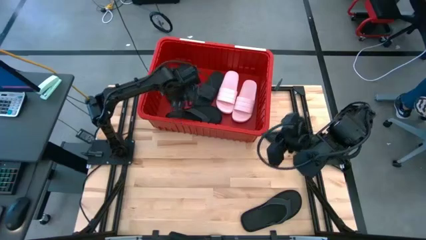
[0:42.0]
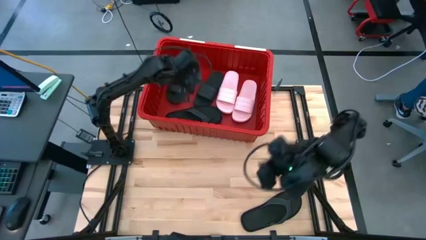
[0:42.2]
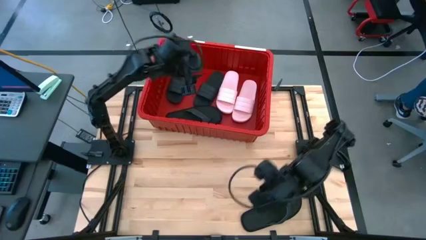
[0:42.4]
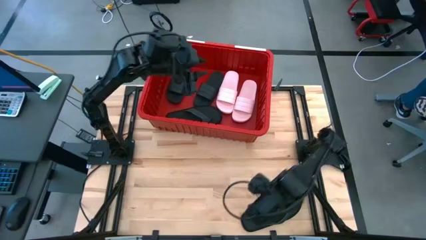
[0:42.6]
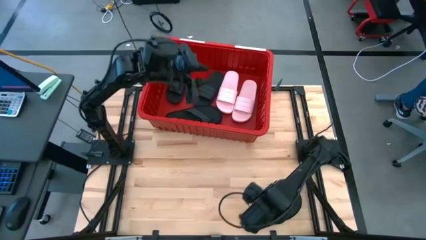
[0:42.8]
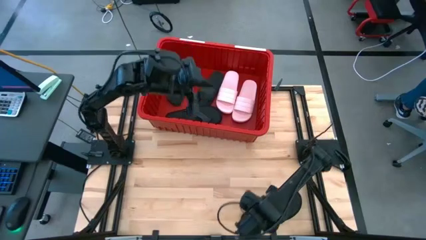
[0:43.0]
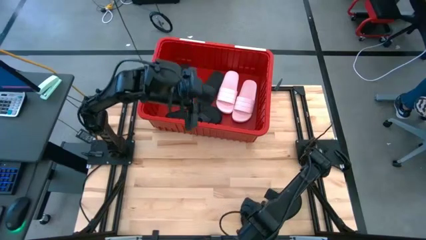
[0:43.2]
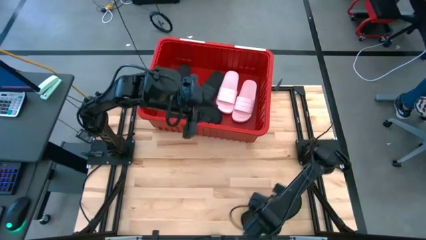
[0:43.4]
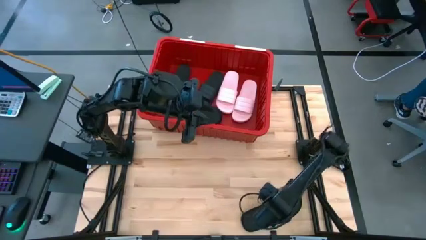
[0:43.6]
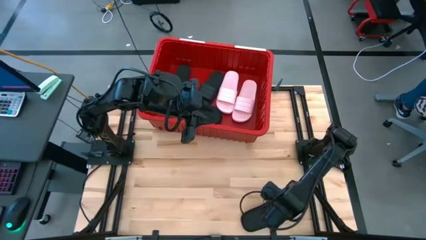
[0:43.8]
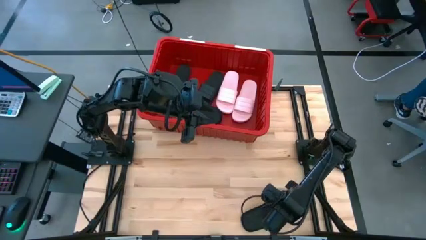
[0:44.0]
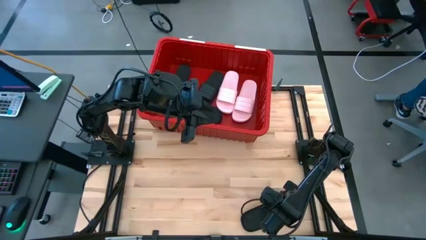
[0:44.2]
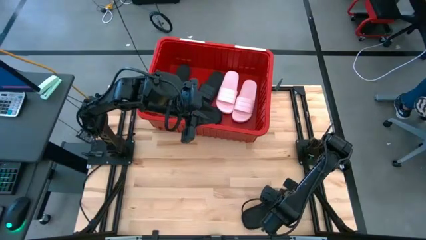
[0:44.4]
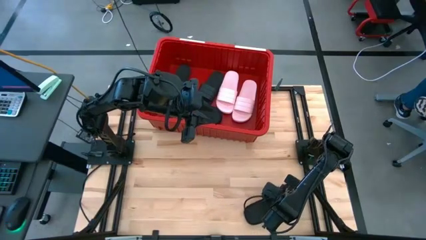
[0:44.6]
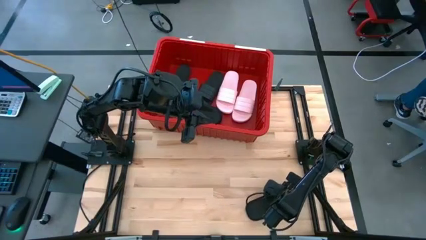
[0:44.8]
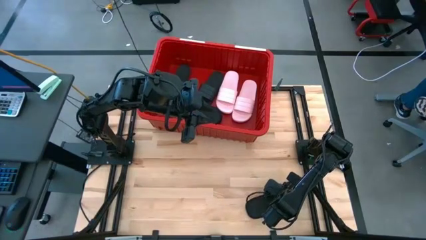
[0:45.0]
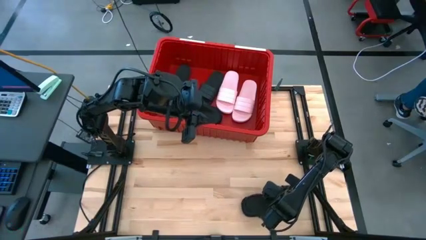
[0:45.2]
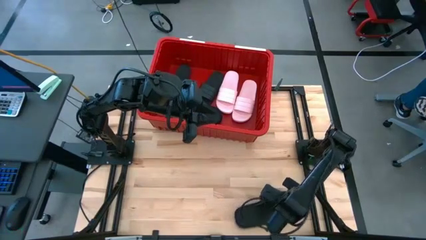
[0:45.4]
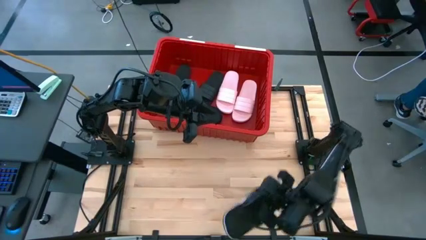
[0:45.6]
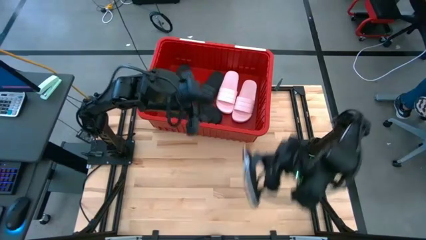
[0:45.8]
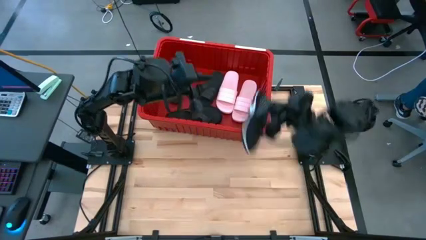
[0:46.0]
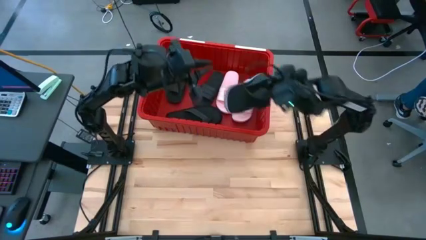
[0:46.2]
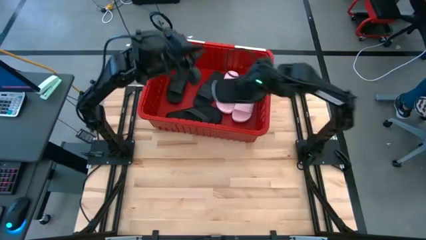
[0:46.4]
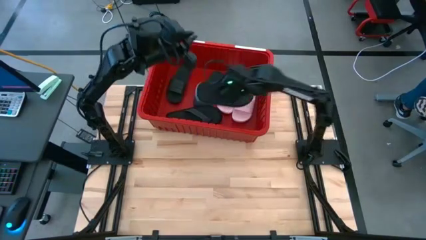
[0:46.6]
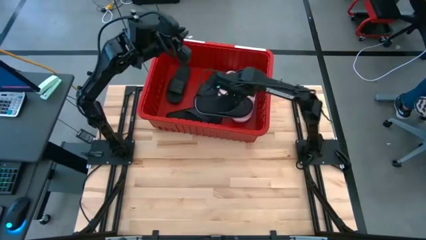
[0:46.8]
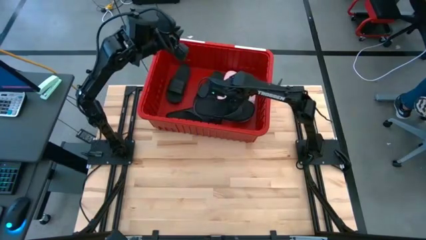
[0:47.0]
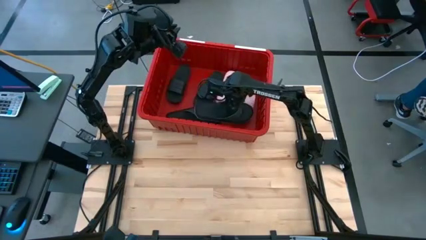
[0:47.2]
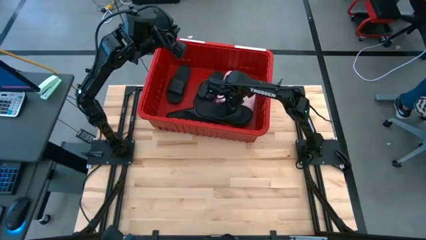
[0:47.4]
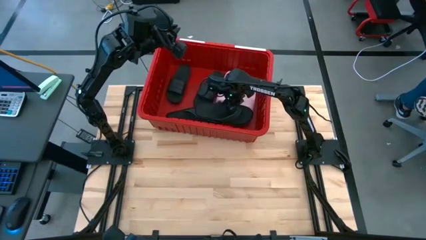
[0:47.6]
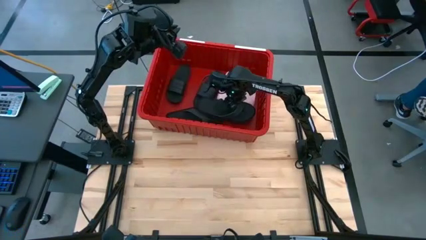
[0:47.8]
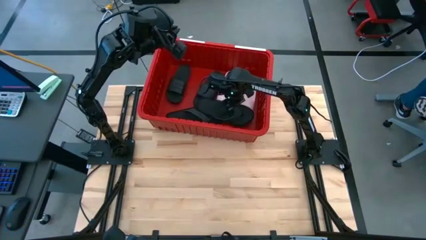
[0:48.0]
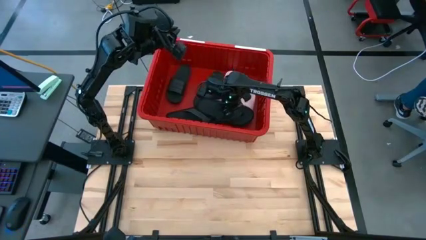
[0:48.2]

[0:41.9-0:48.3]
Task: Pick and place slides into bin
Put the black slipper into the red bin

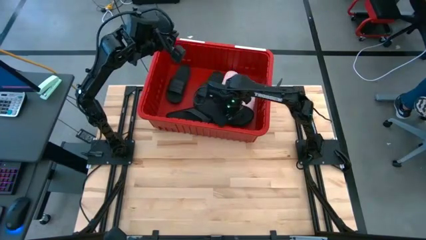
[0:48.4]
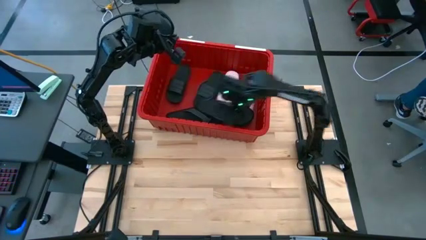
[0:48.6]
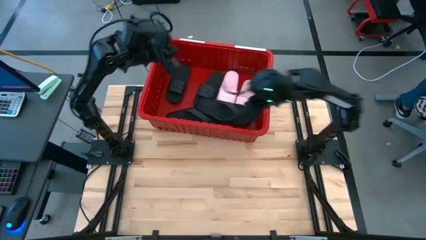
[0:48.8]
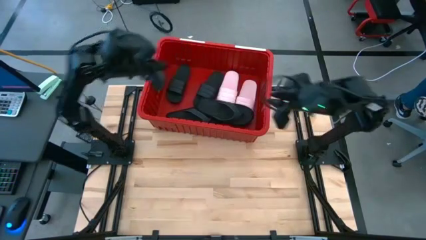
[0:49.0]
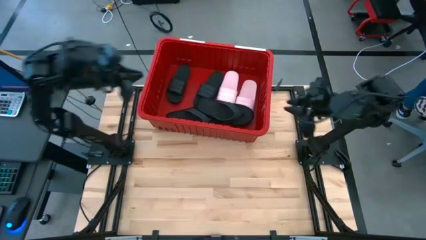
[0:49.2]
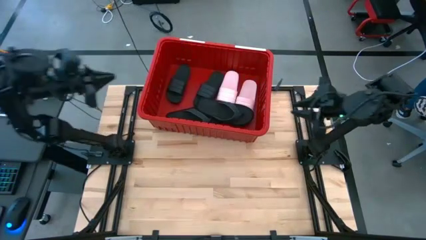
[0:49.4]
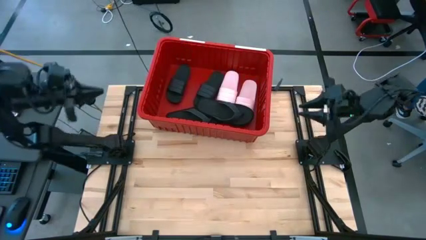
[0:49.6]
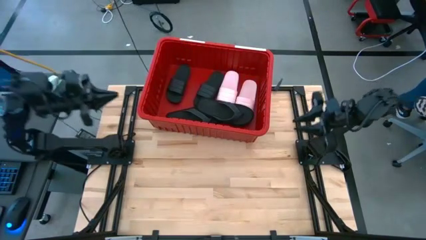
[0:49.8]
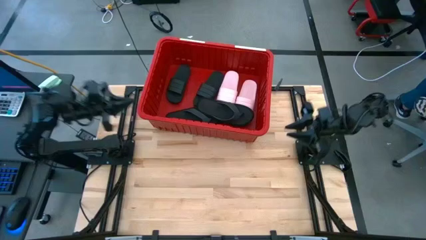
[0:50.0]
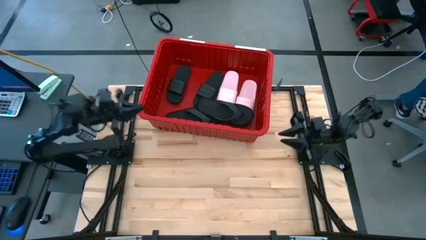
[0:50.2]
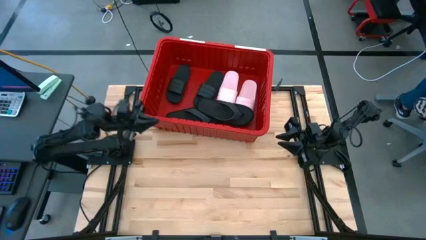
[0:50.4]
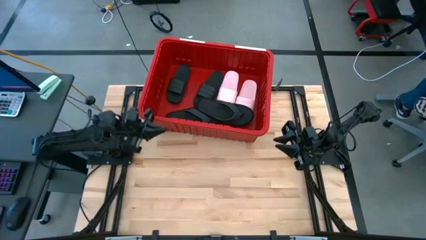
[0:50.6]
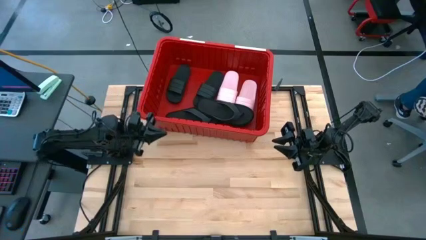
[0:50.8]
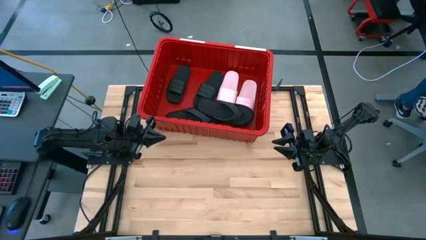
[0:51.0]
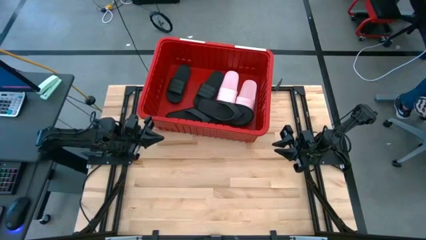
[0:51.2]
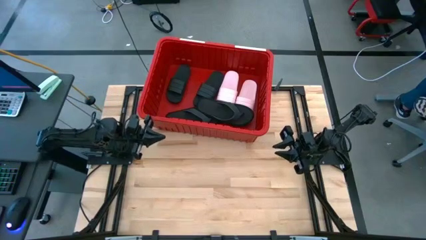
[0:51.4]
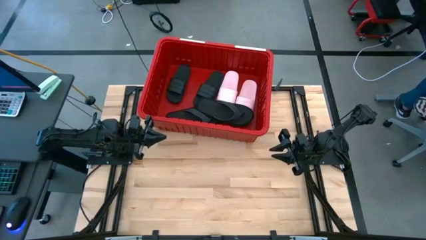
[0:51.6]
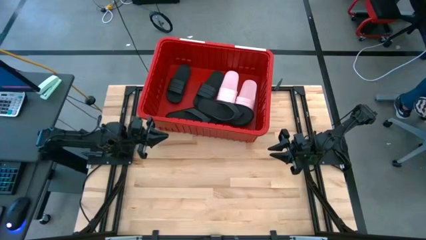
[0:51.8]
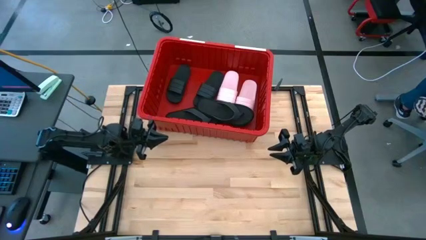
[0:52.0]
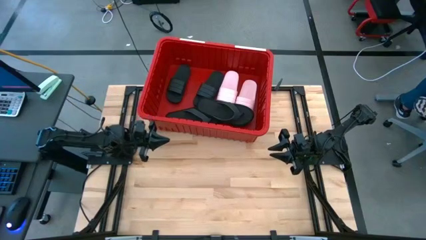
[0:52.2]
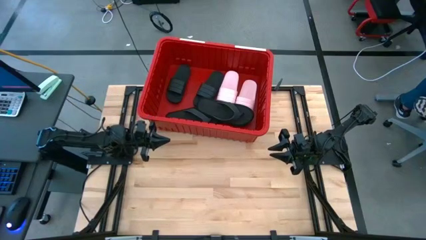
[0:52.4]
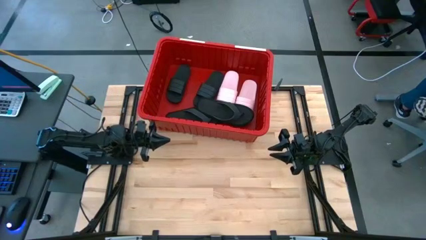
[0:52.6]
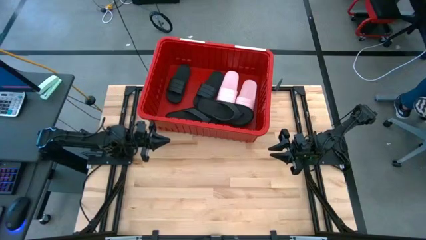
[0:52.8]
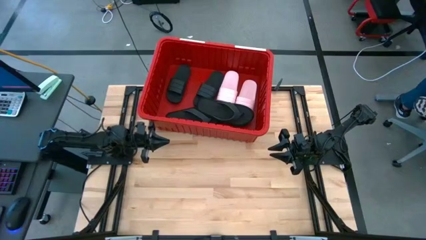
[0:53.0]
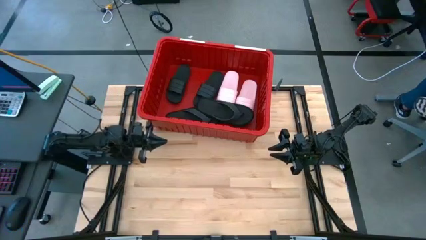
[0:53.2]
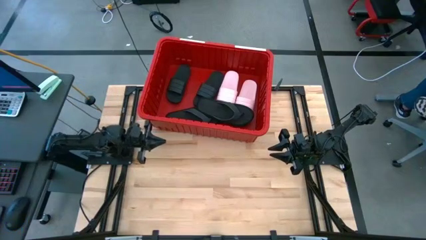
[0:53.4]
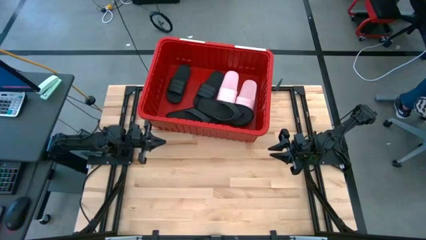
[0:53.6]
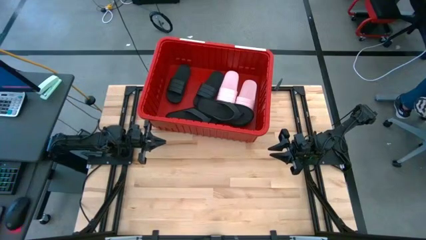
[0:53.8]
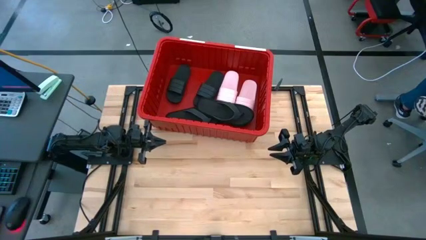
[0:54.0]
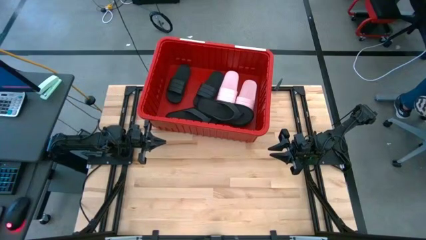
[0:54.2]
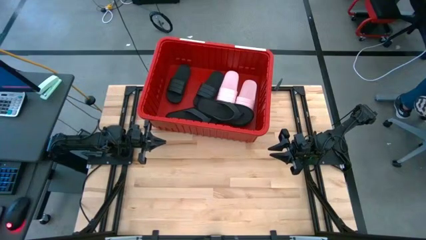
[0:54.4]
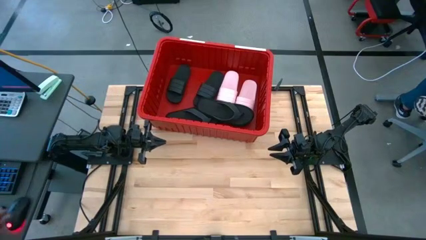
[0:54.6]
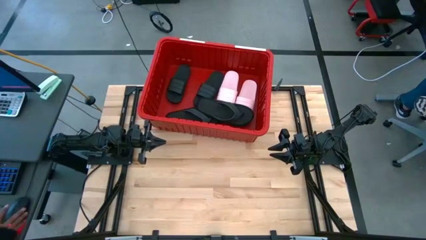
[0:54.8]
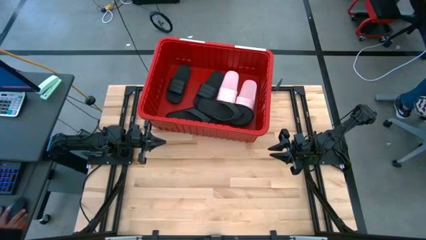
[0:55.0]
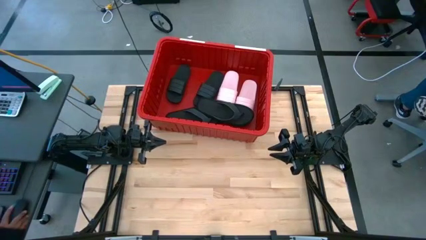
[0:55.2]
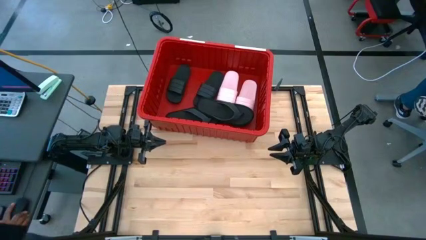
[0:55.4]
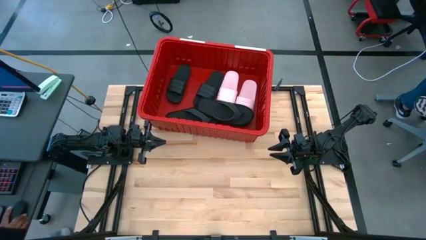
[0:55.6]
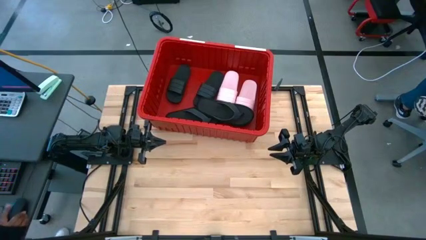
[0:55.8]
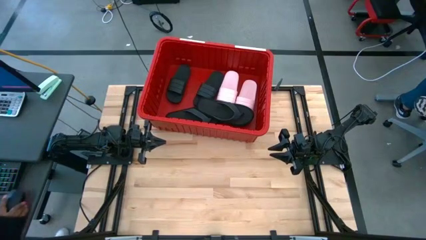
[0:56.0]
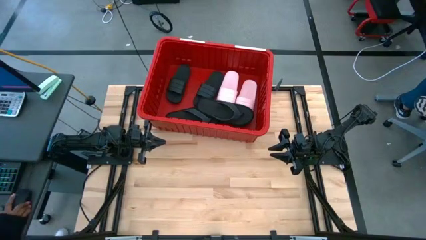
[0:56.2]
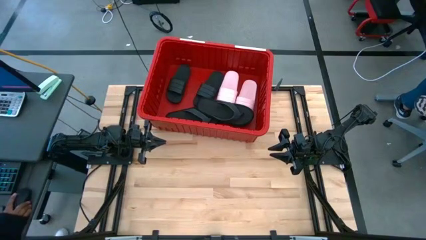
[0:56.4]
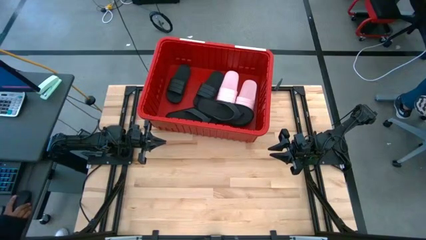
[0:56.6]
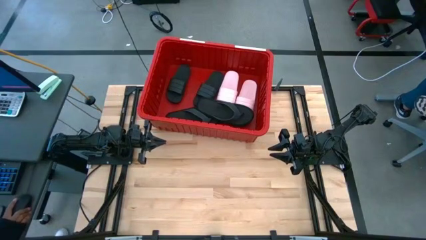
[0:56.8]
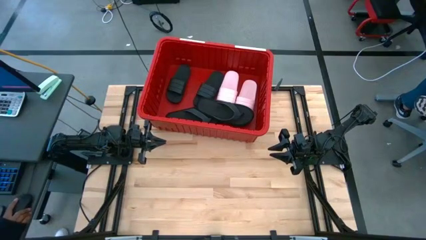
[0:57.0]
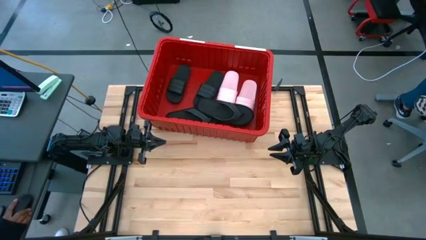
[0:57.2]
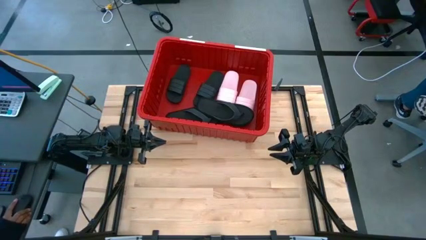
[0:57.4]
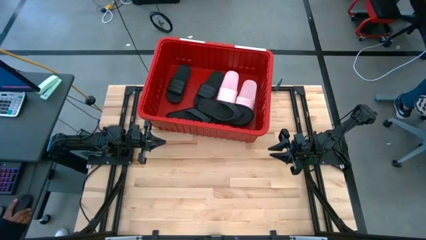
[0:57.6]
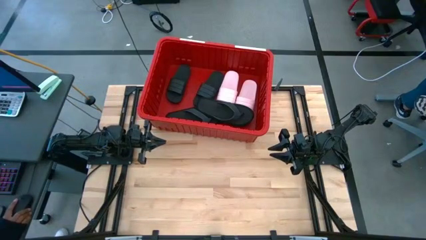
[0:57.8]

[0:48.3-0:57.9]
Return to Home Position
